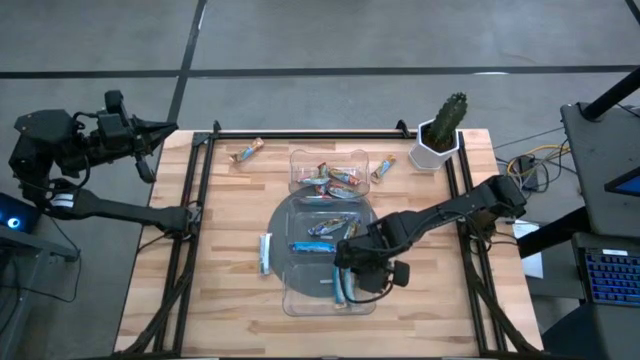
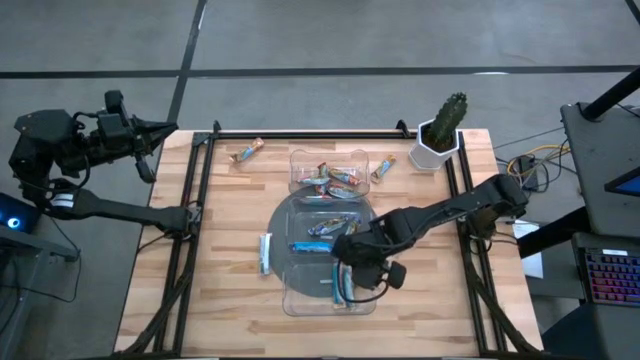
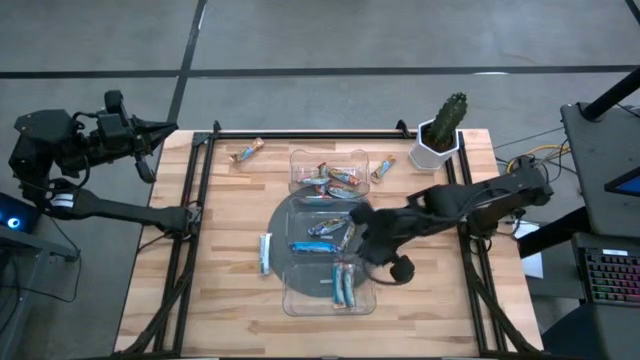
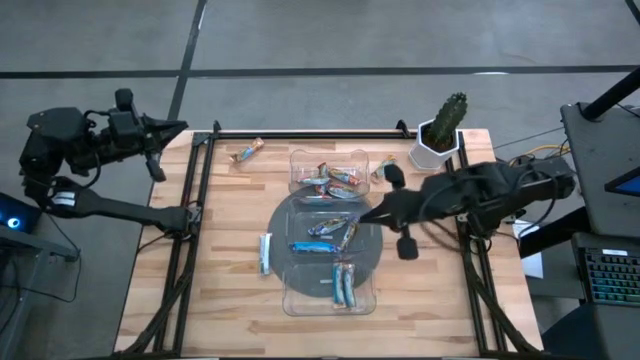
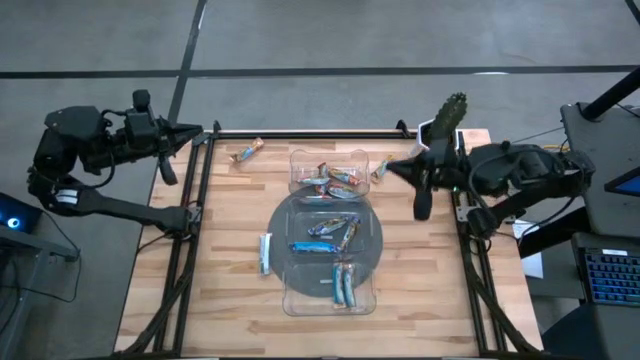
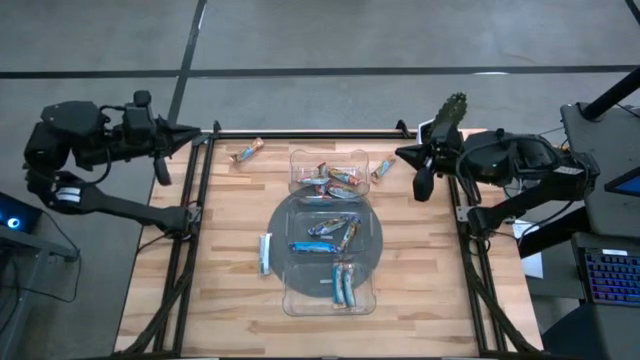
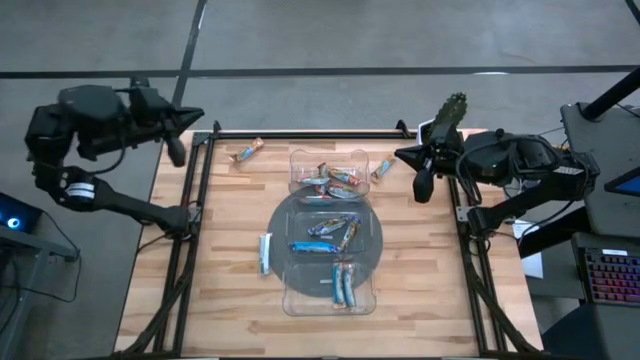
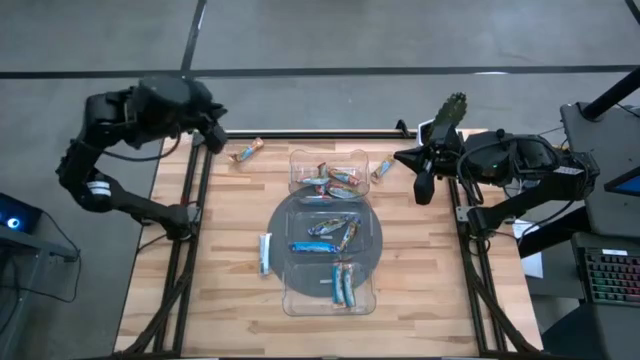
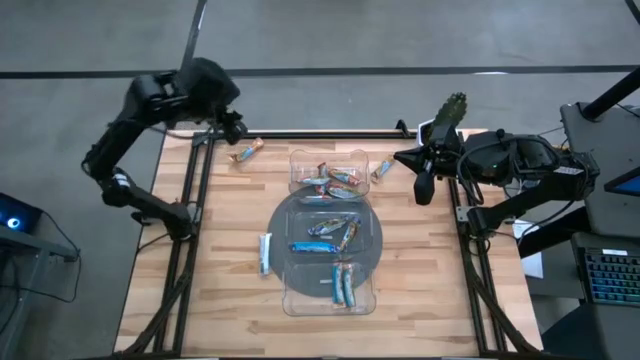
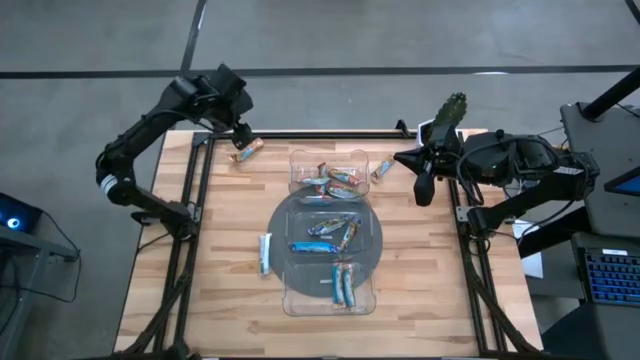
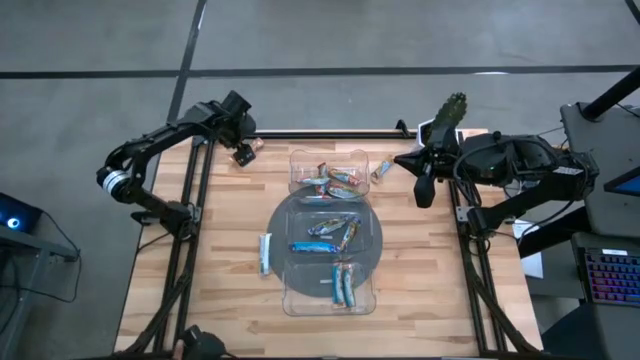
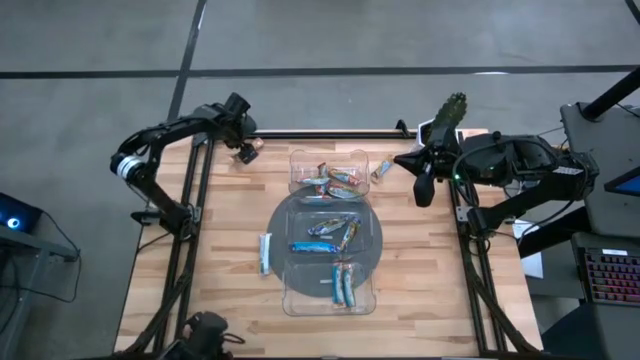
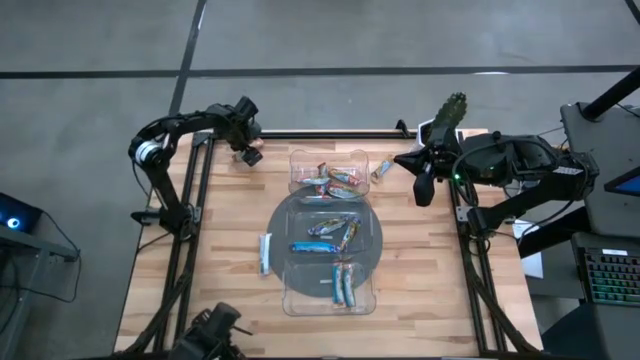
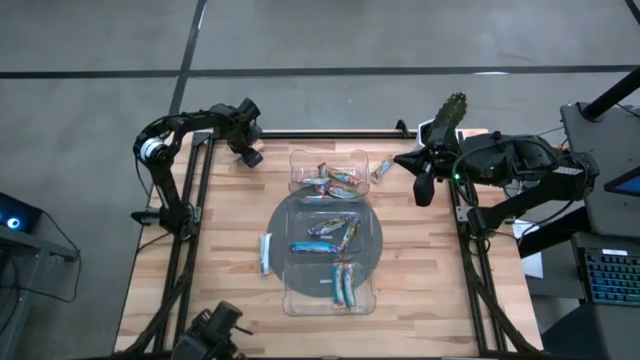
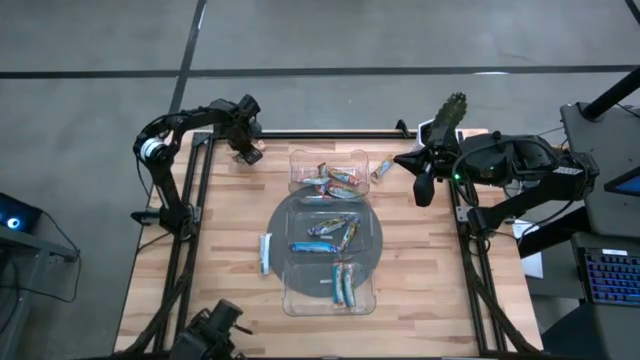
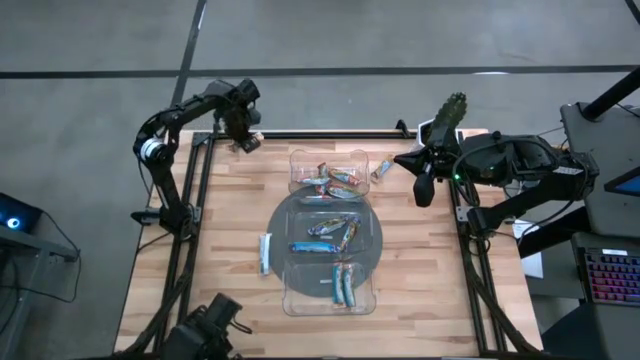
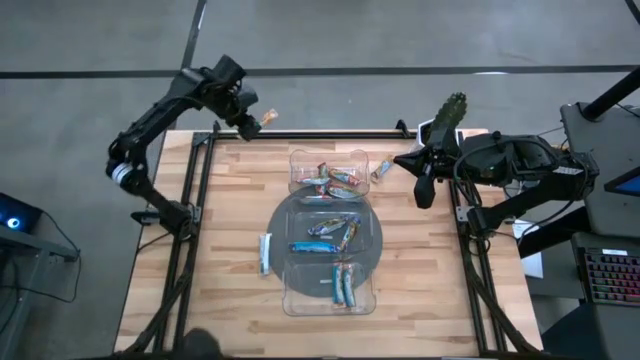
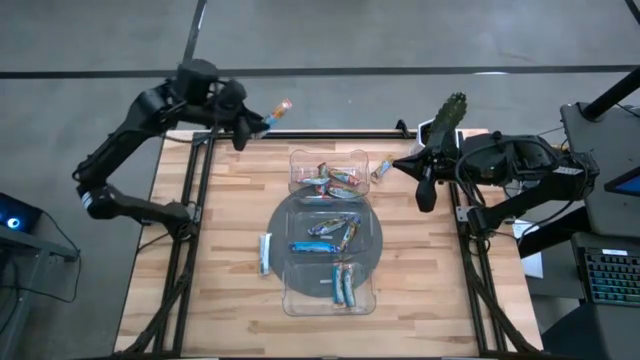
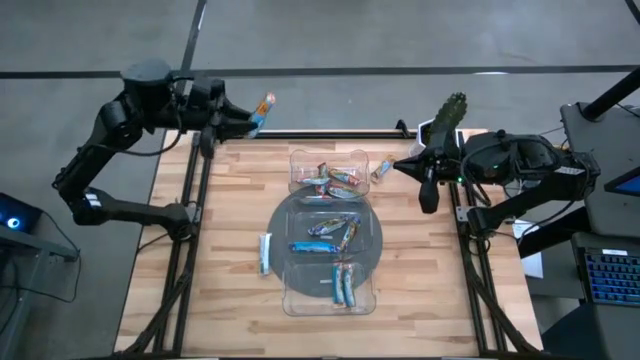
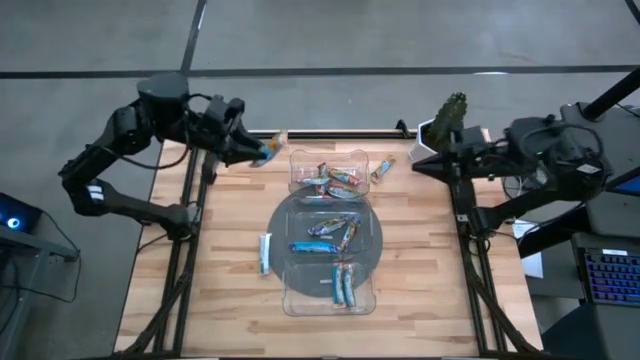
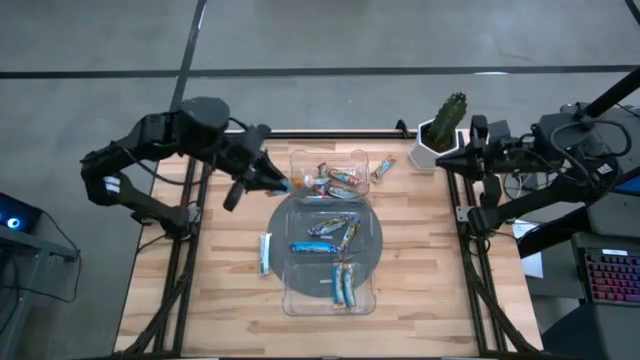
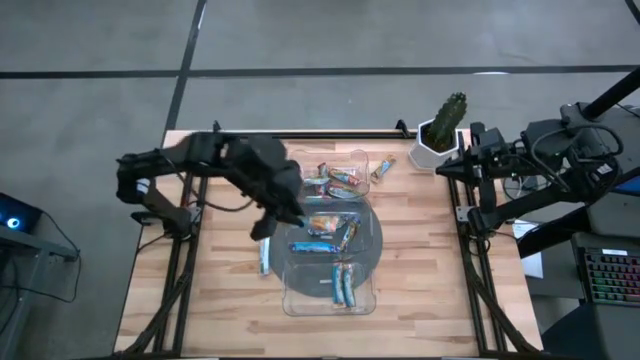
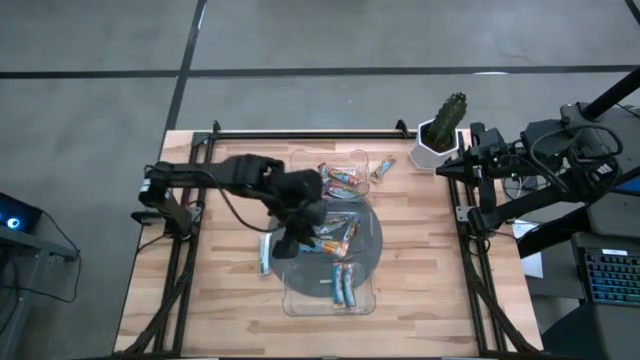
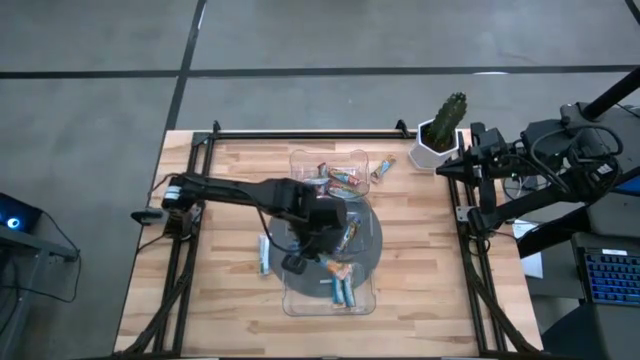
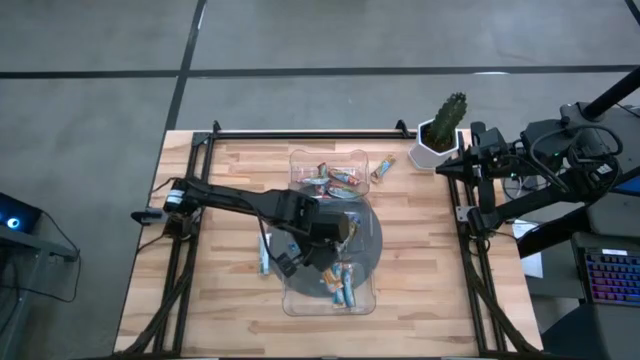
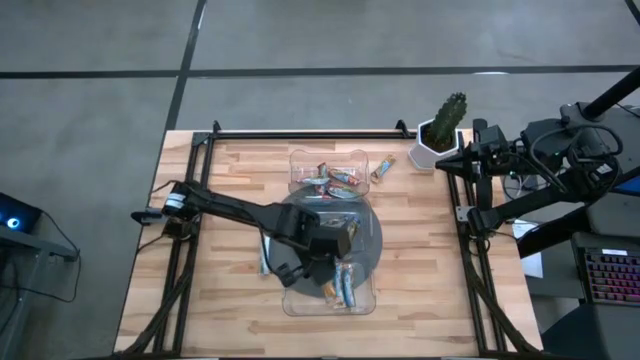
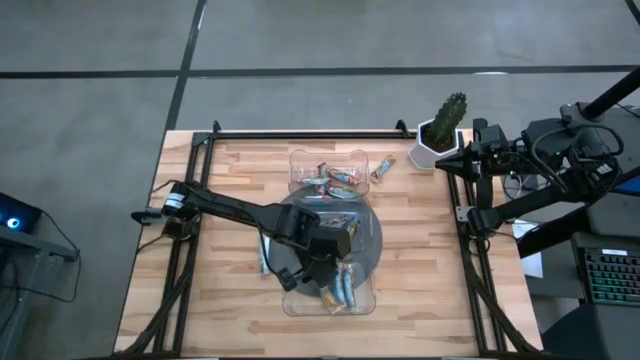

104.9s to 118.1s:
Task: Pick and place Granola Bars by type
Put the yellow granola bar into the bottom transparent bin

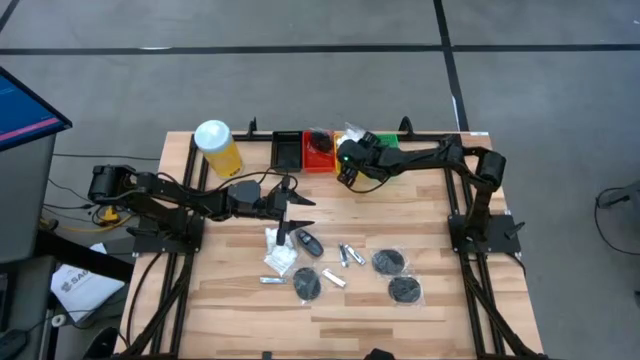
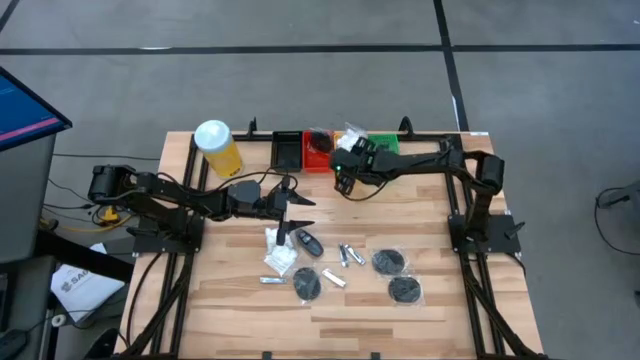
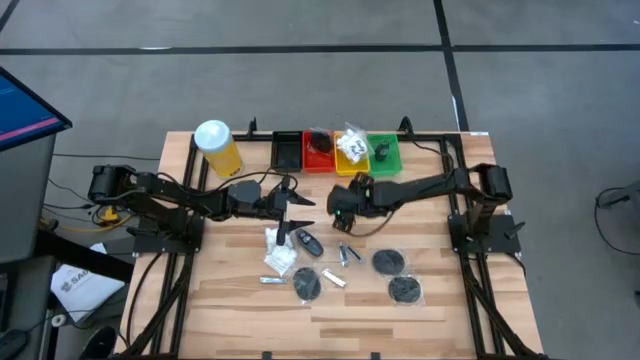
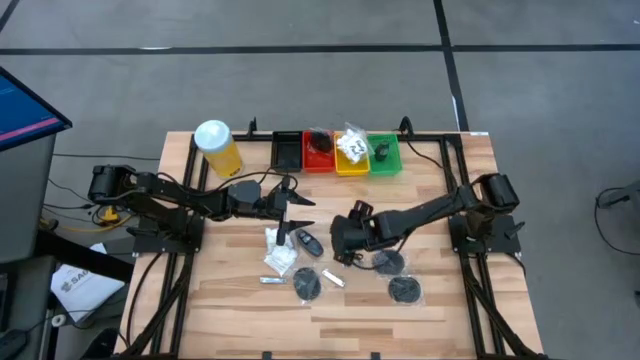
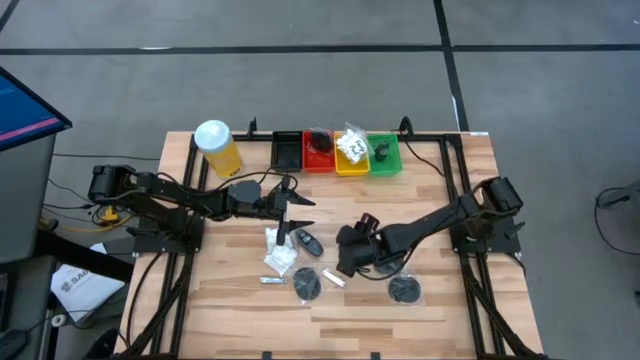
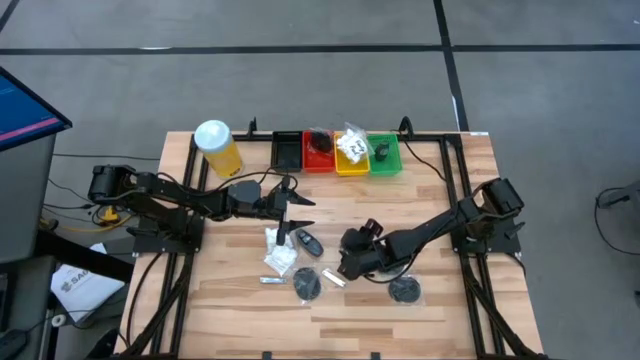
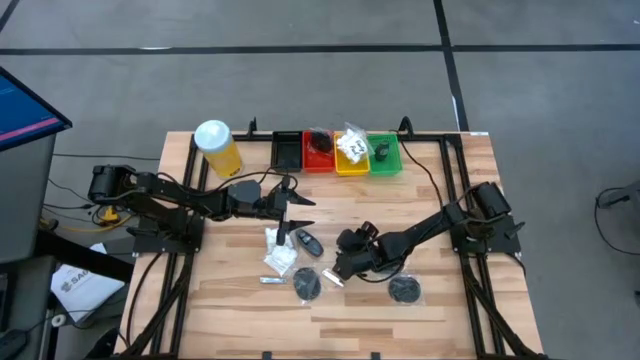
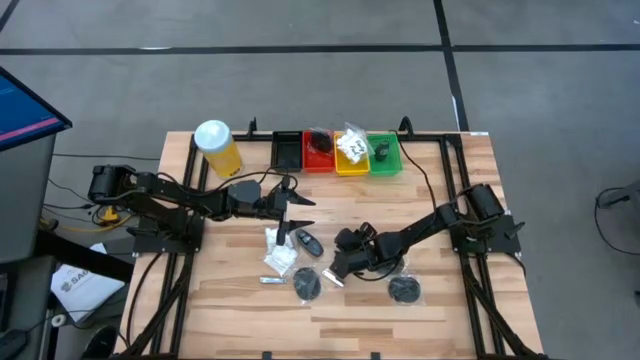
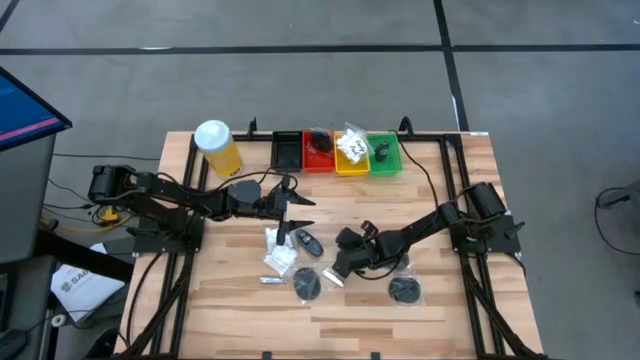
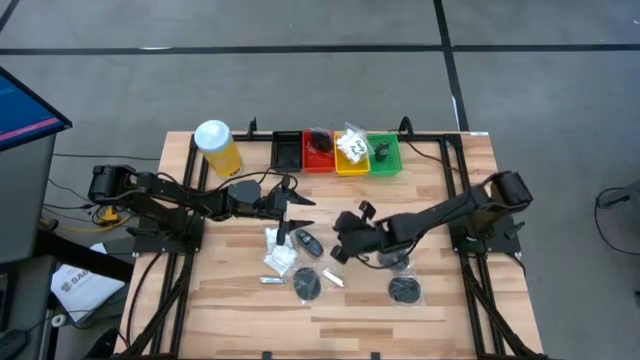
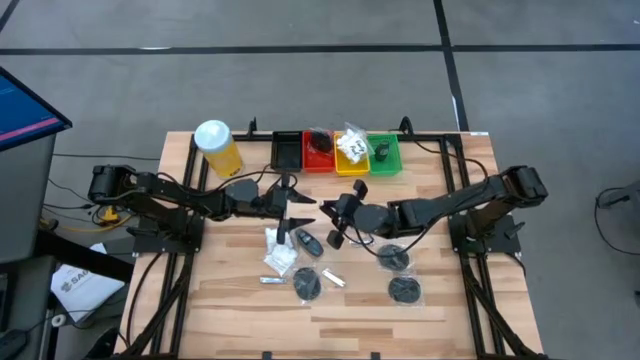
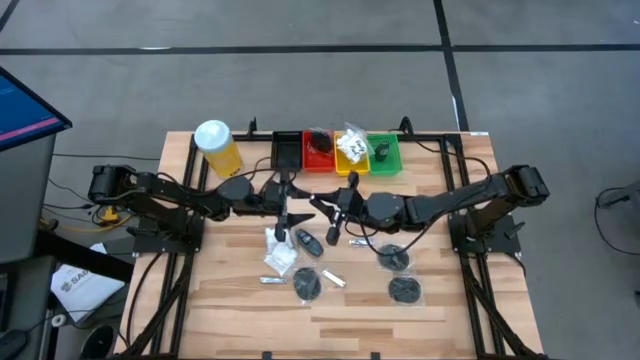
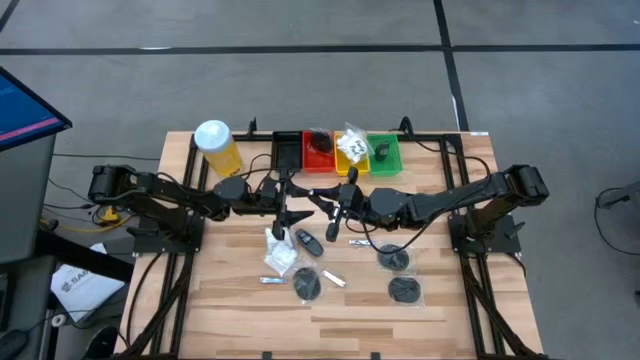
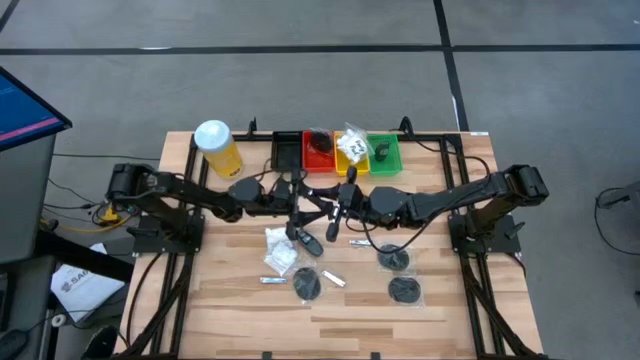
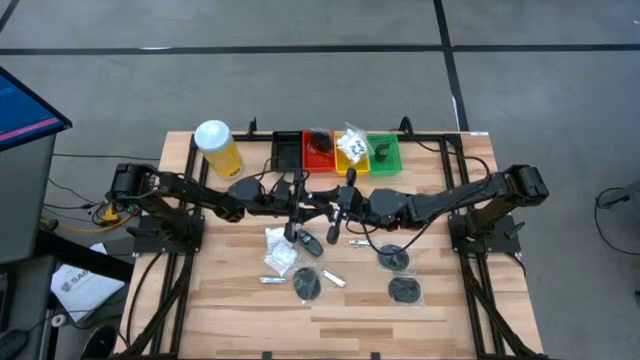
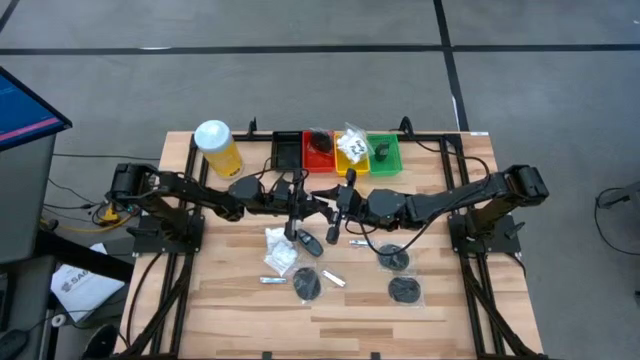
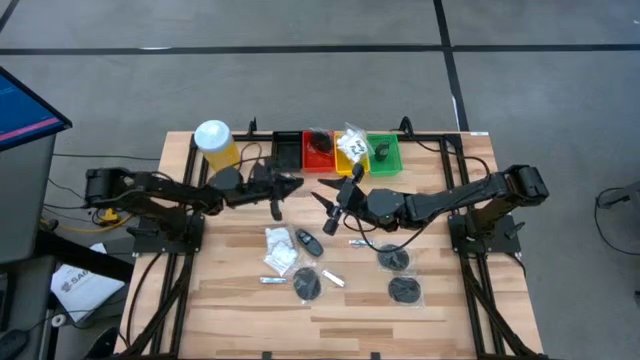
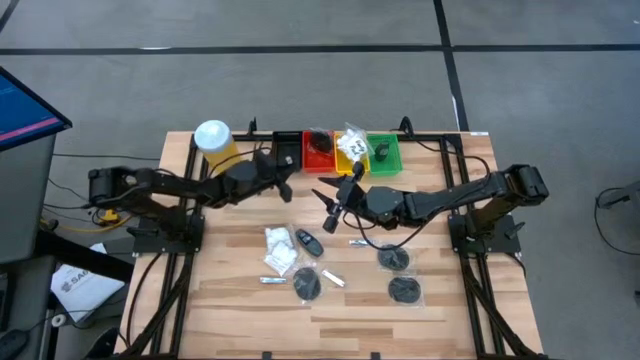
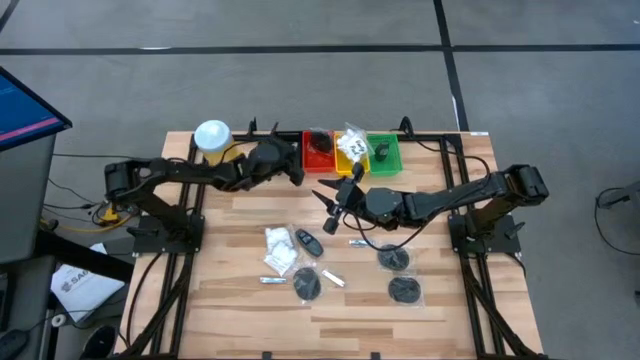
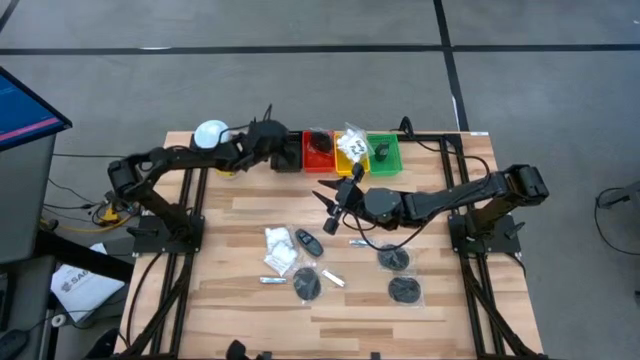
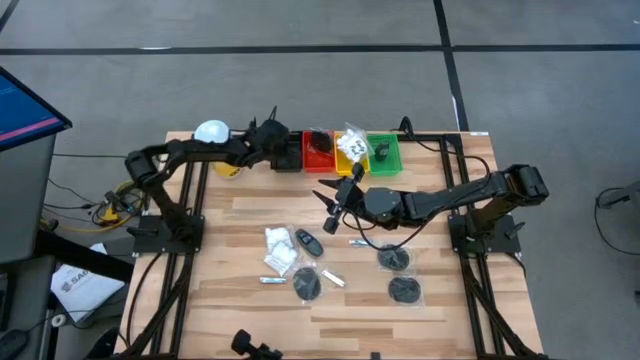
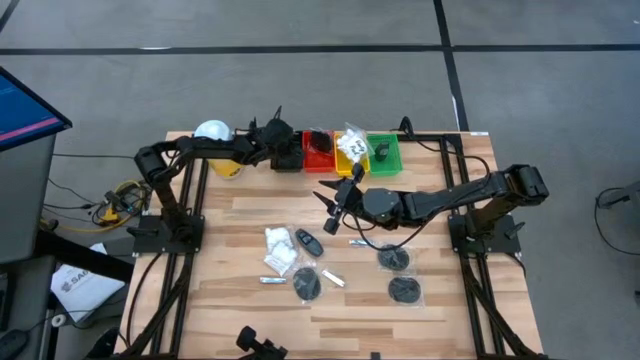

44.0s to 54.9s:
Task: Pick & Place Travel size toiletries
Put the nail cutter into the black bin
